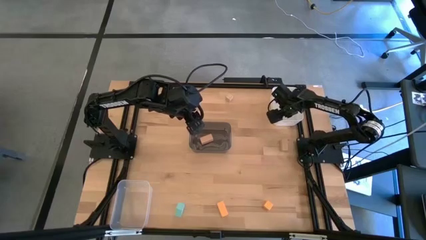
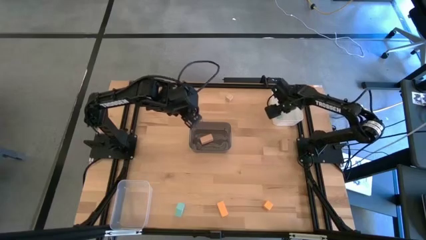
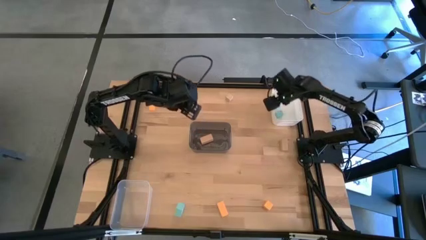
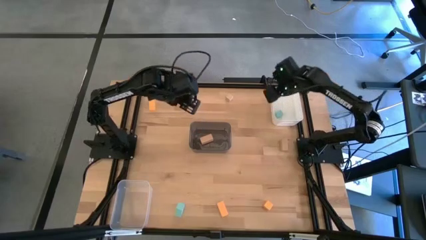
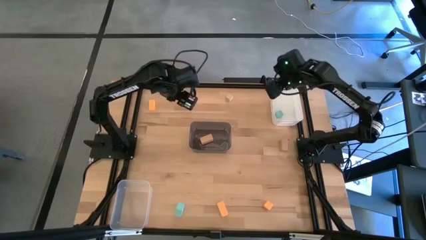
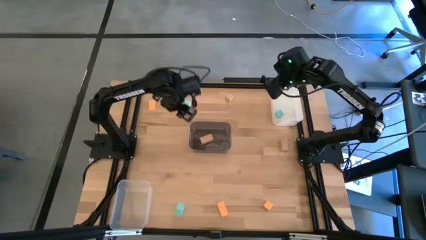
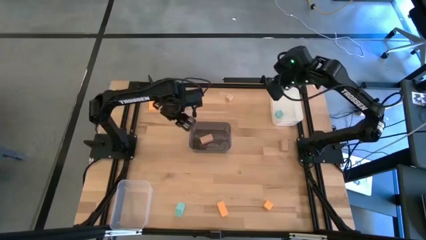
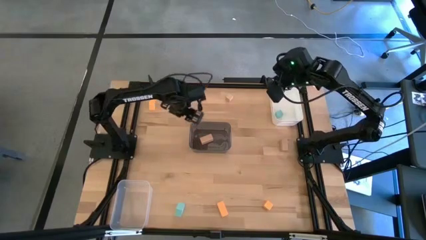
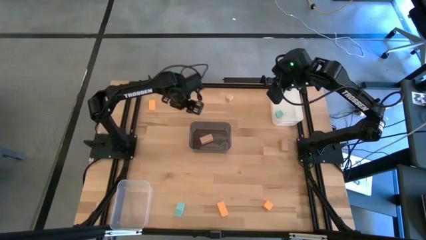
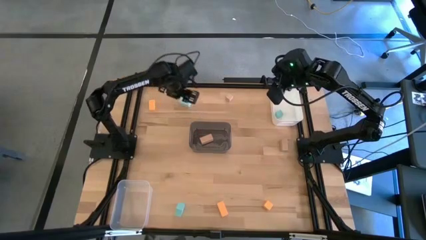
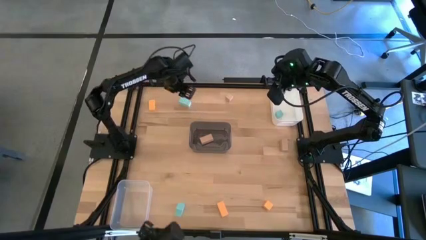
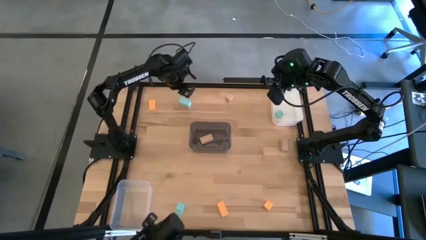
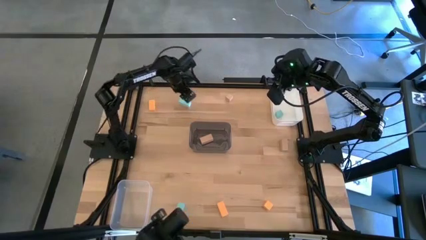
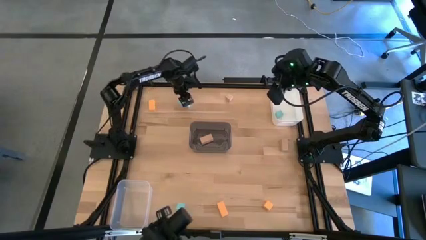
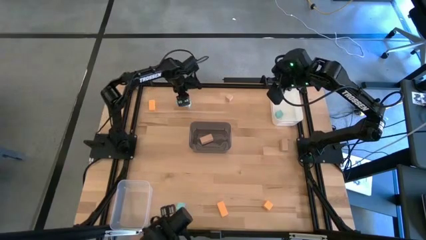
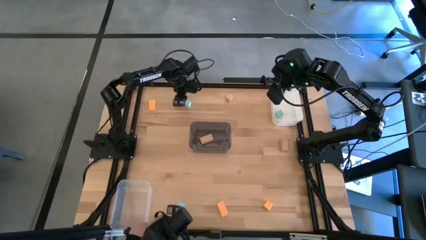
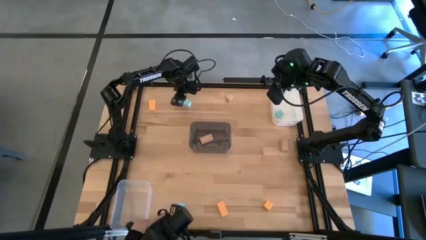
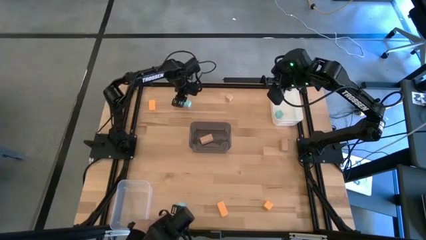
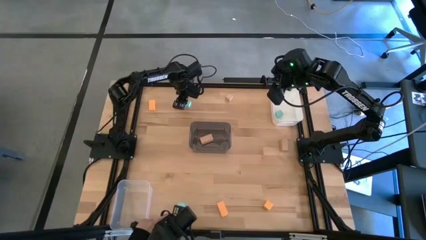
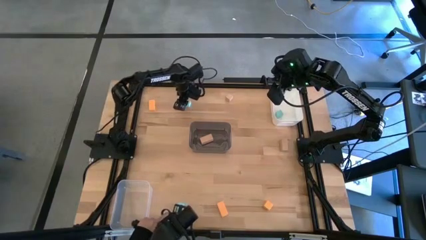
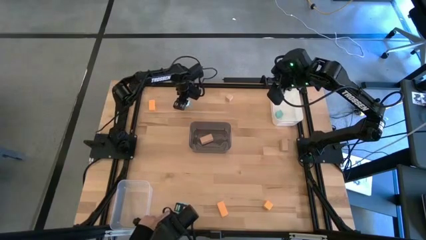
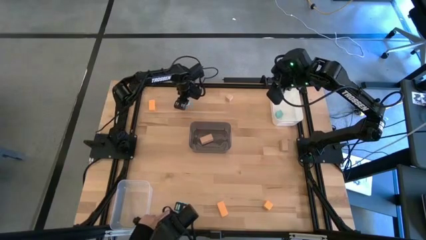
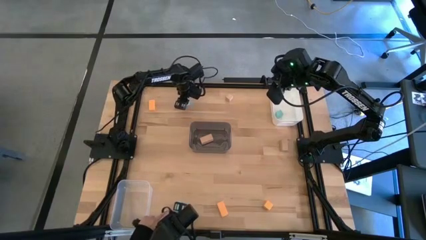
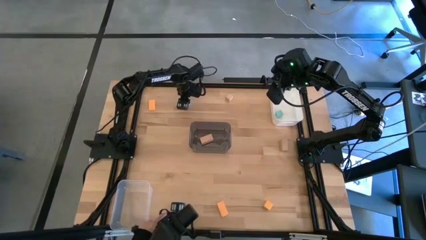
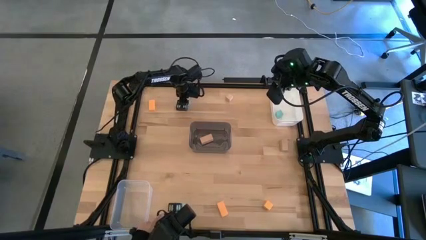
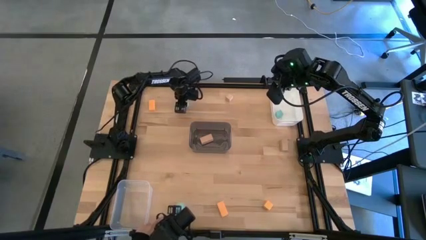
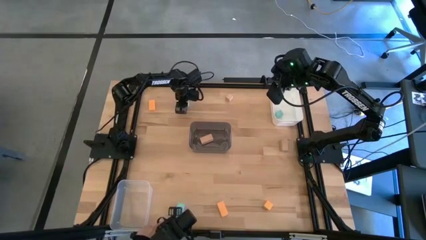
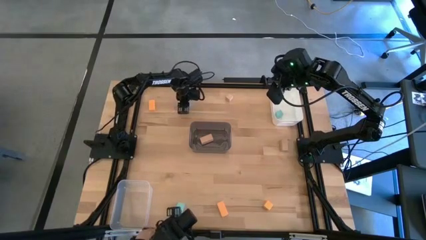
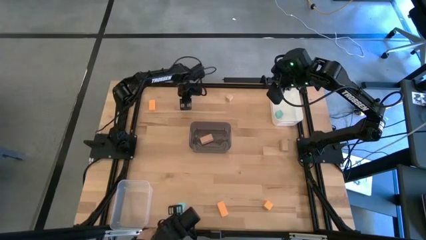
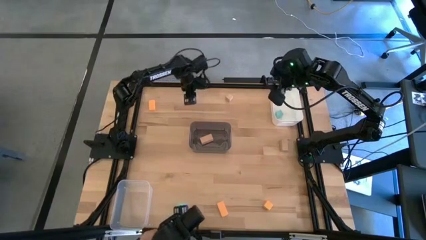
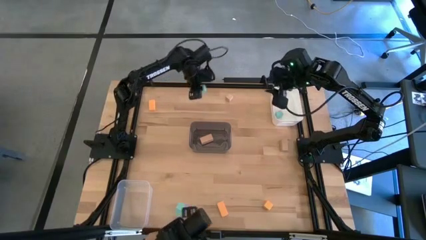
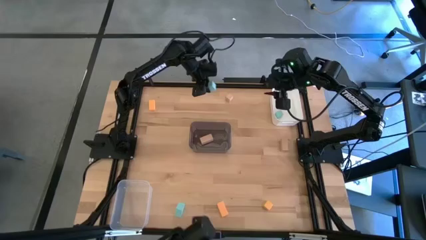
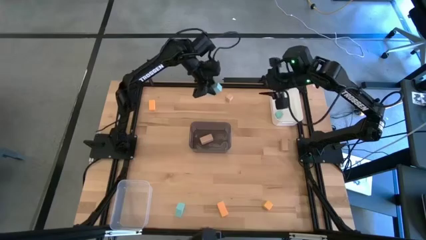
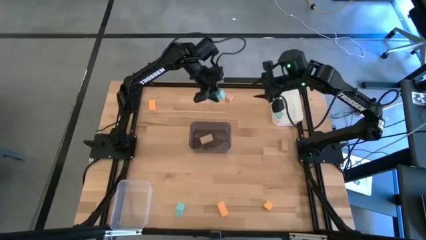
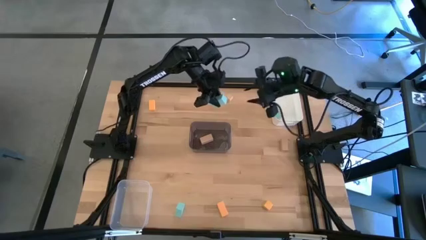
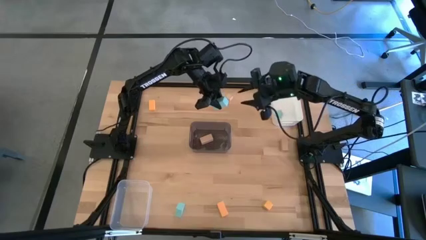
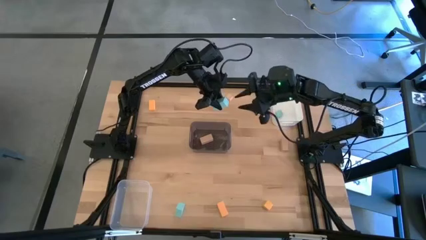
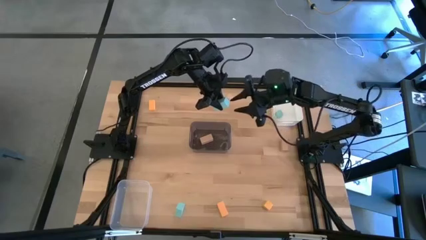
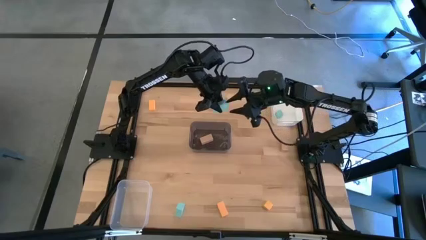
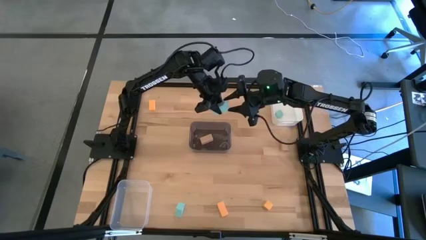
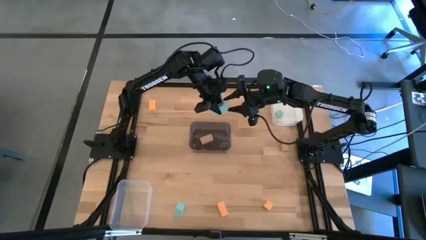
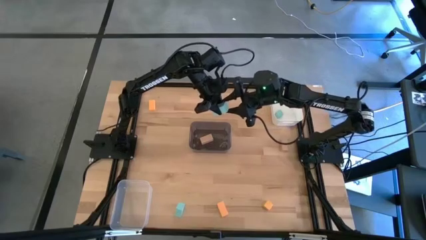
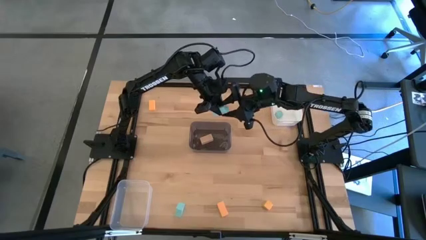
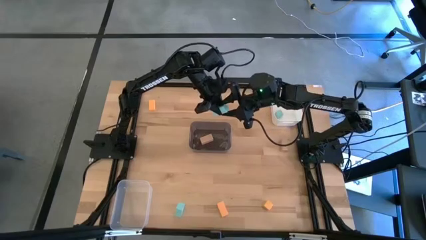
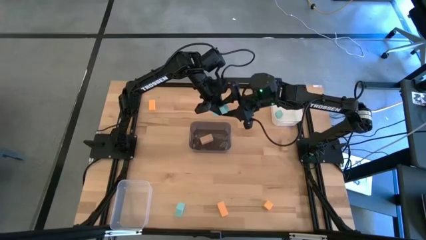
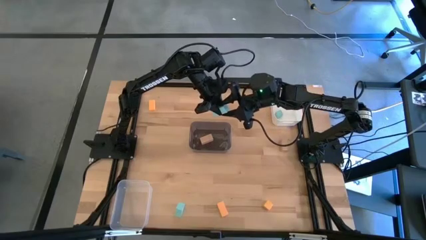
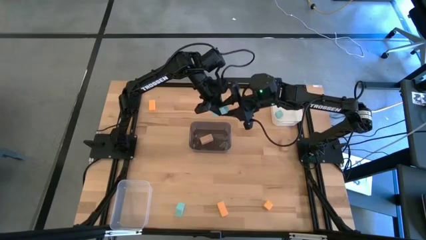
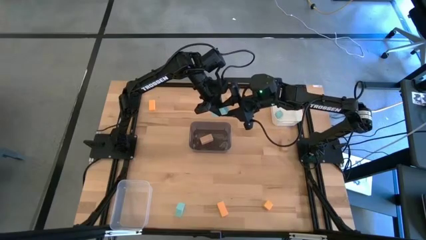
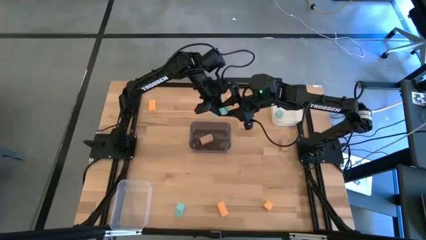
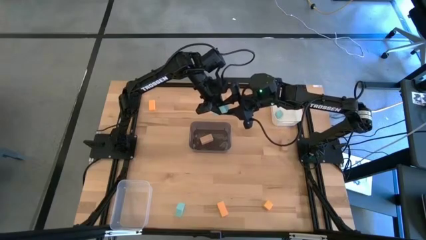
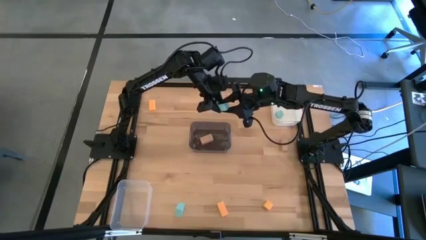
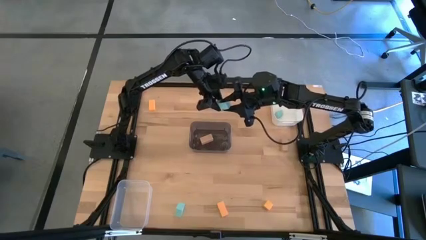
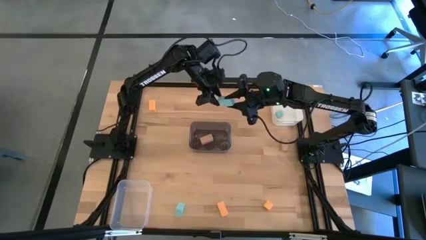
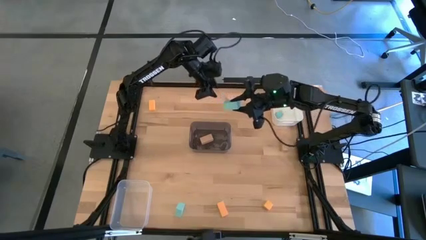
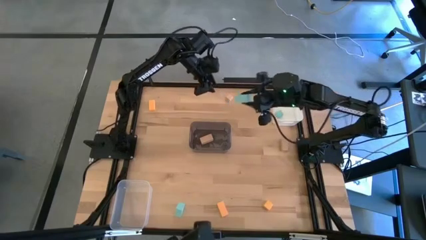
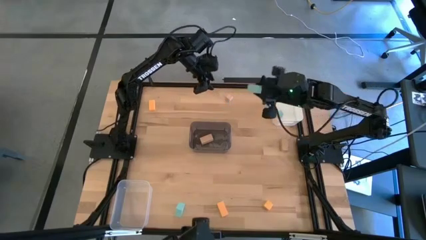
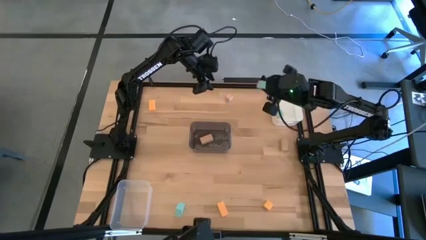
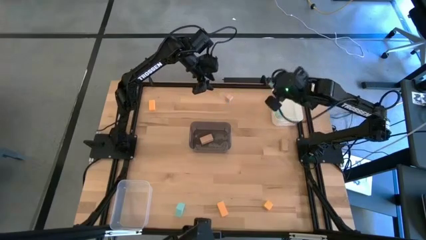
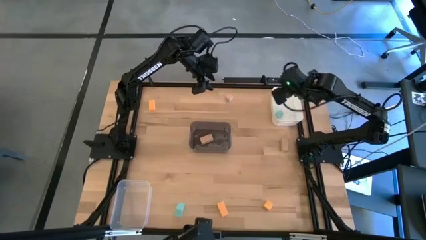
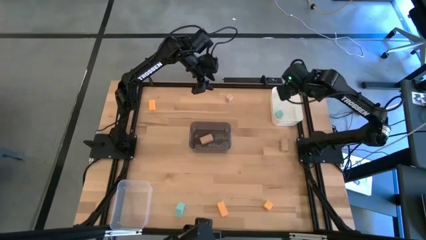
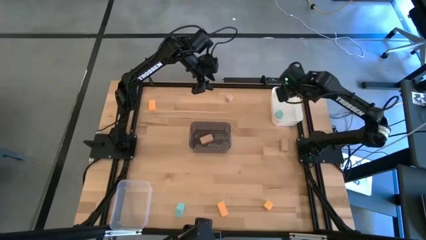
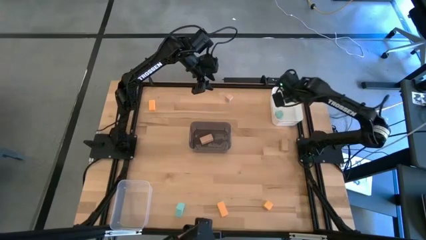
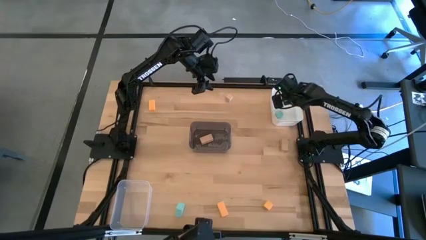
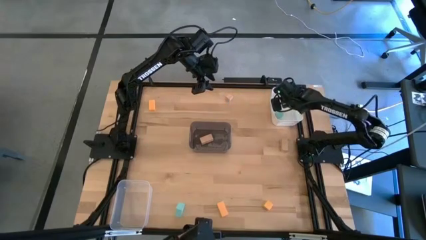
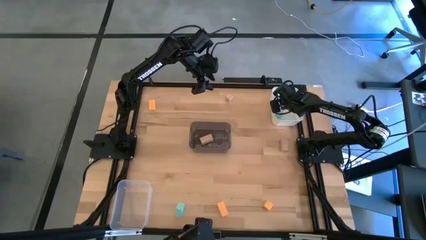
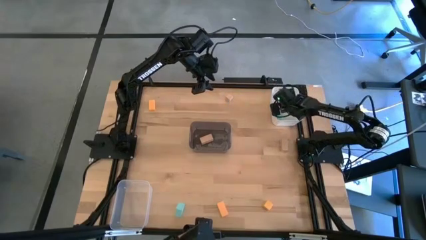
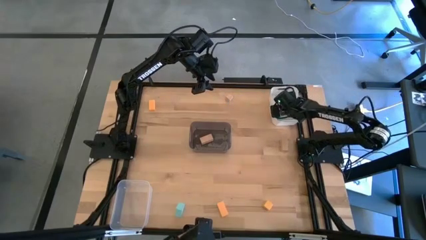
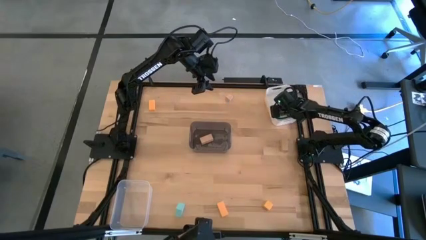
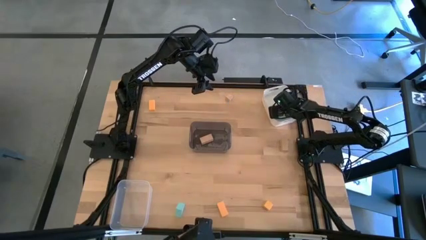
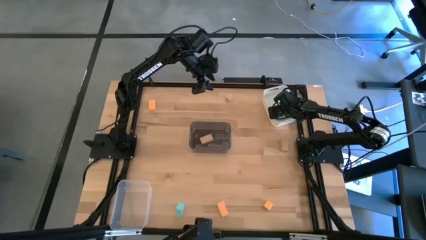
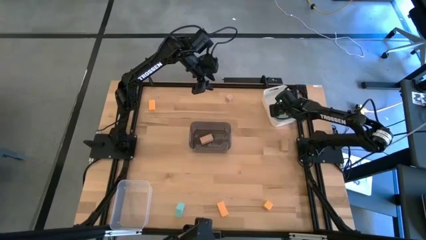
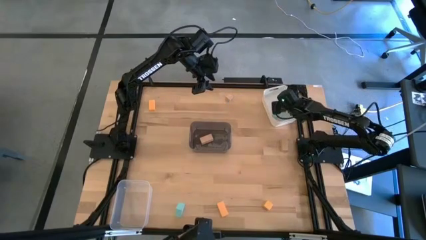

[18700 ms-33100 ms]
Task: Sort & place blocks by color
Put the top blue block into the white bin
